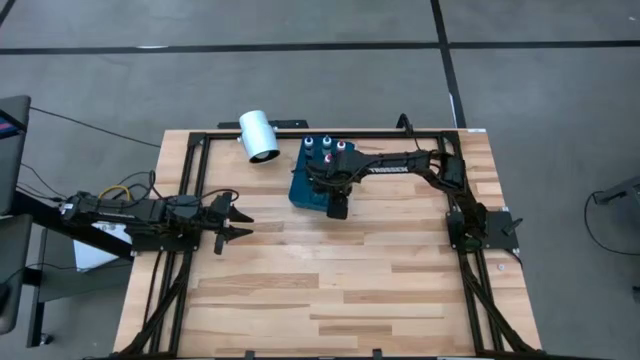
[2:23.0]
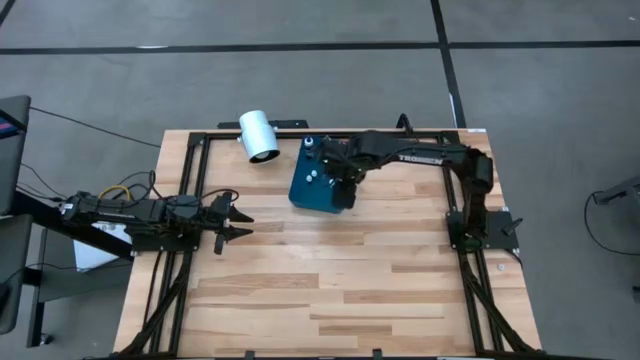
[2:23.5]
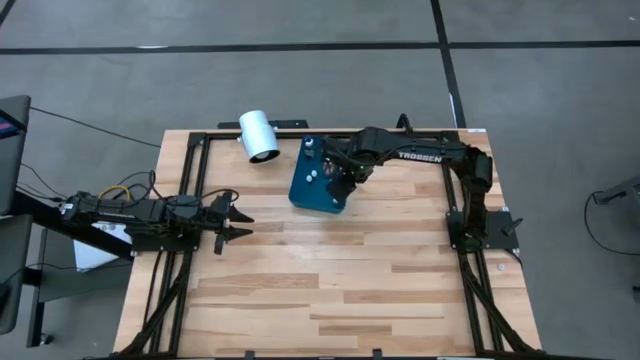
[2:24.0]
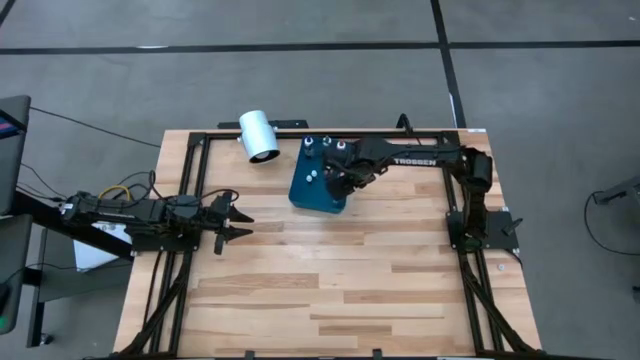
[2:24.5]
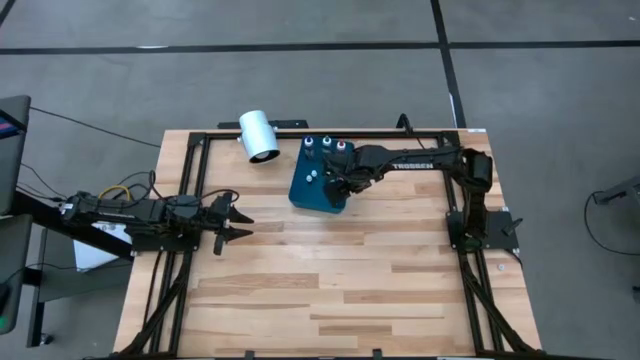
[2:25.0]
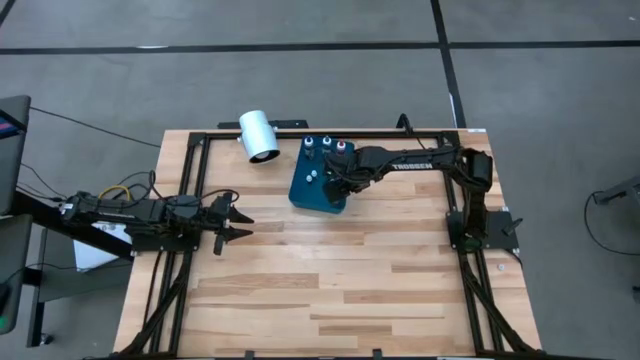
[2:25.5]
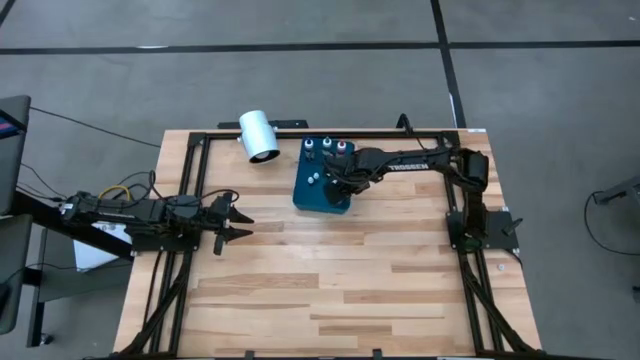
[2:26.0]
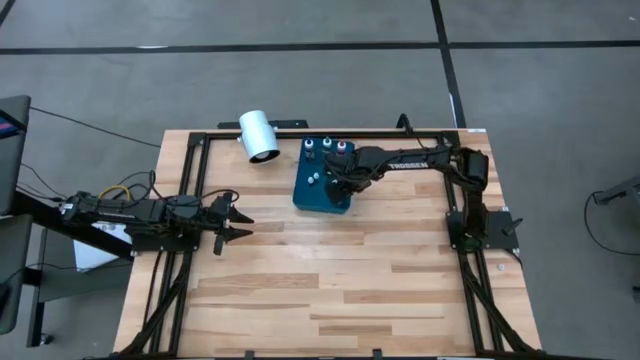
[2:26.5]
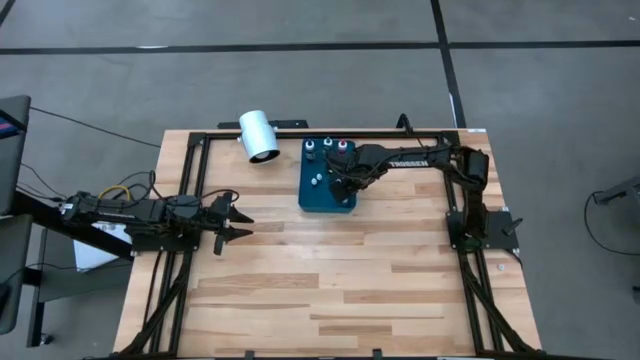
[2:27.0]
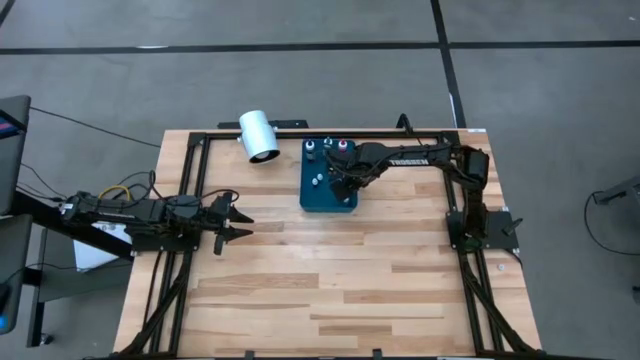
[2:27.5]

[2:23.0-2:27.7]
Task: Pick & Place food coloring
Adjust the blue bin on the table

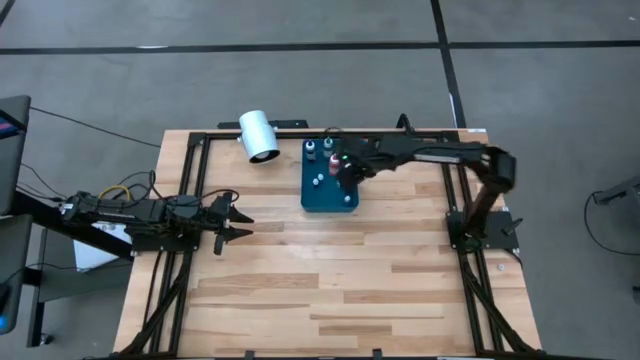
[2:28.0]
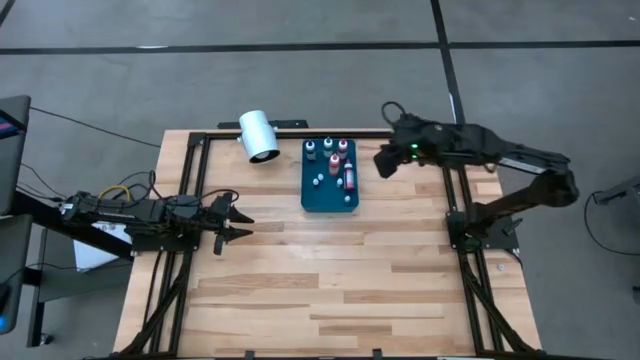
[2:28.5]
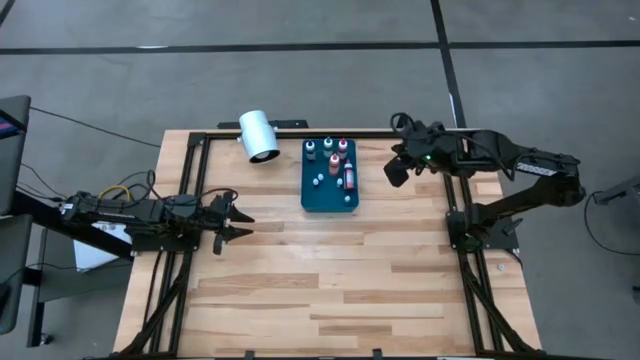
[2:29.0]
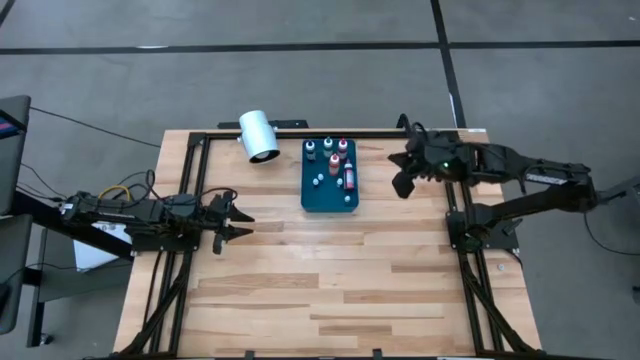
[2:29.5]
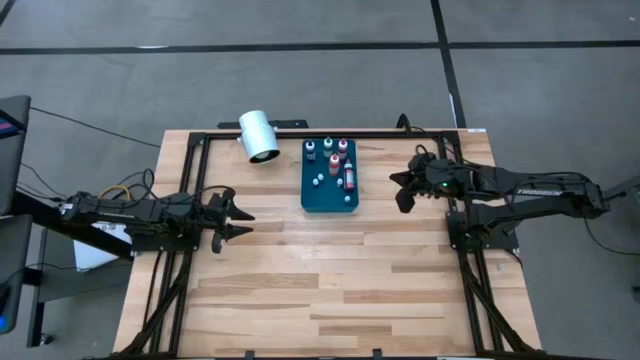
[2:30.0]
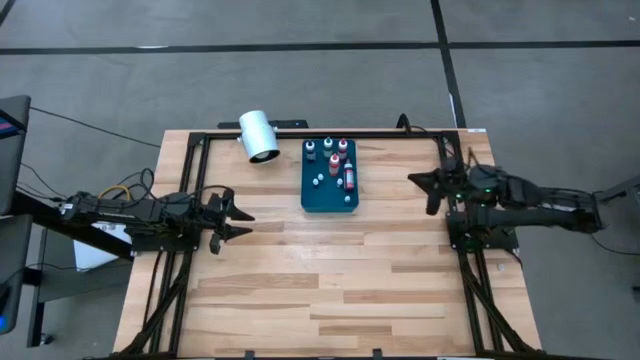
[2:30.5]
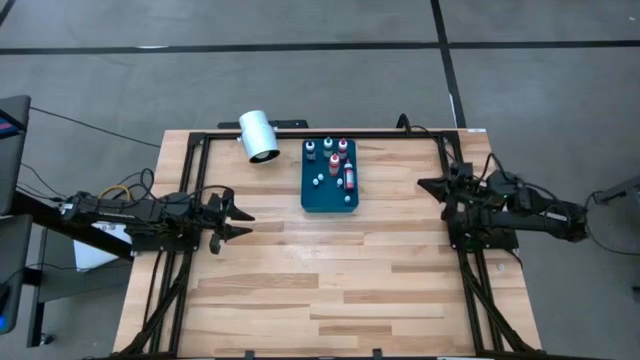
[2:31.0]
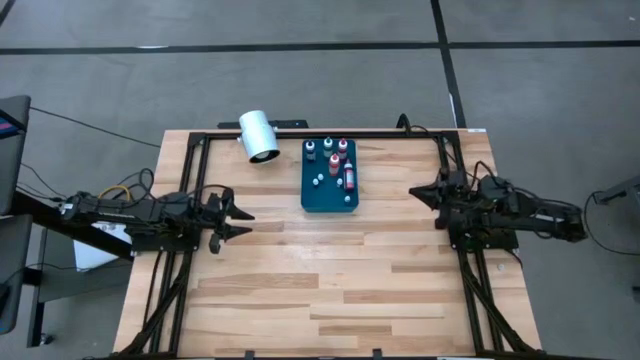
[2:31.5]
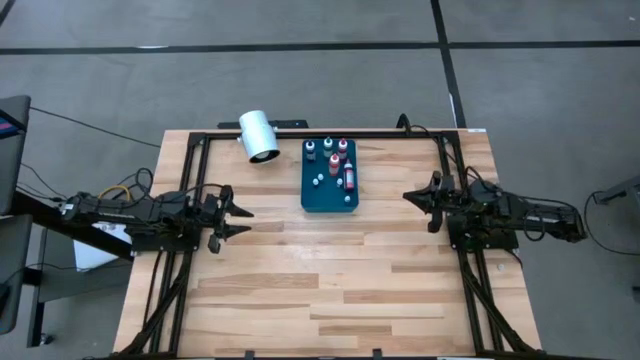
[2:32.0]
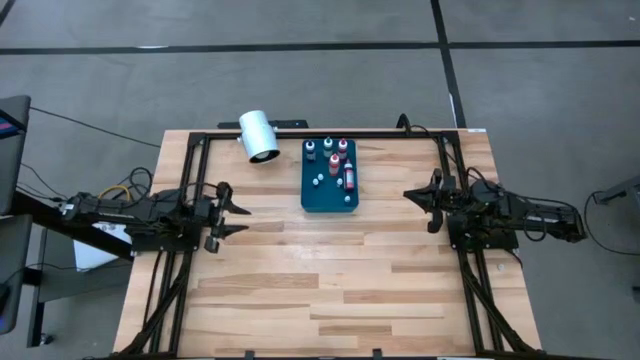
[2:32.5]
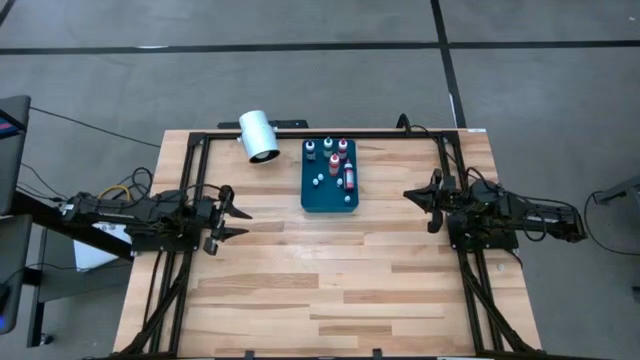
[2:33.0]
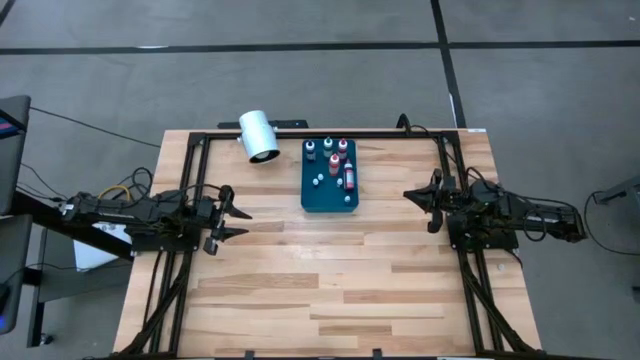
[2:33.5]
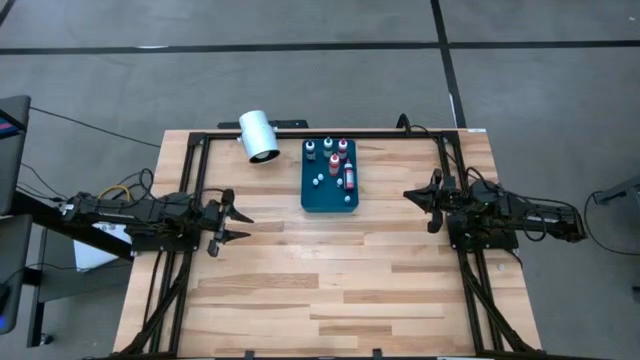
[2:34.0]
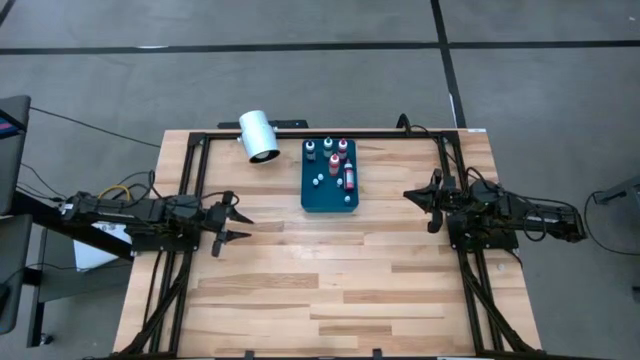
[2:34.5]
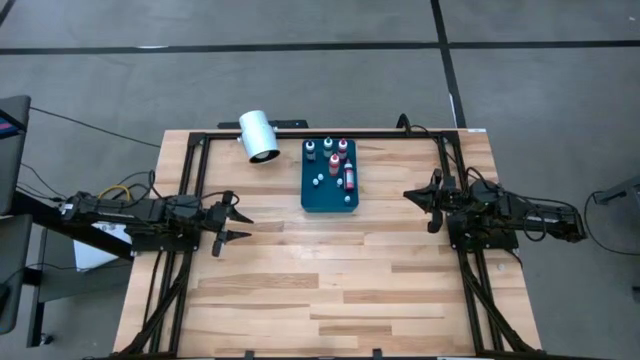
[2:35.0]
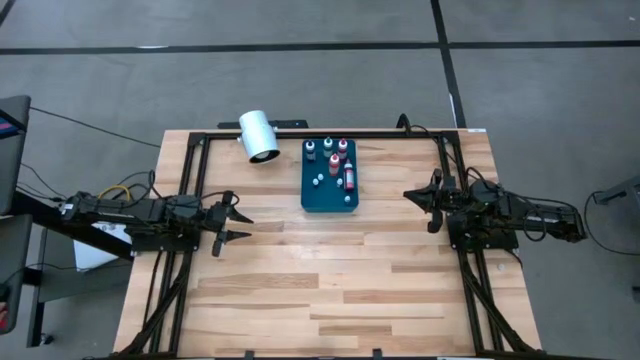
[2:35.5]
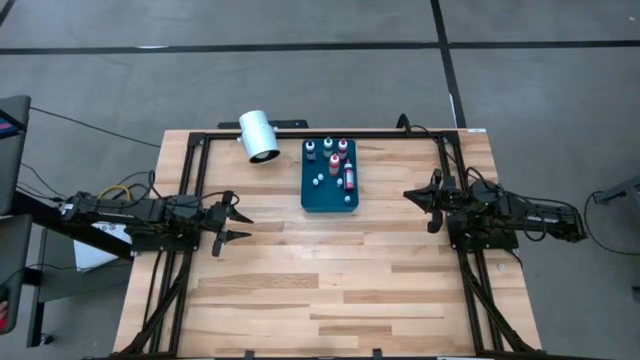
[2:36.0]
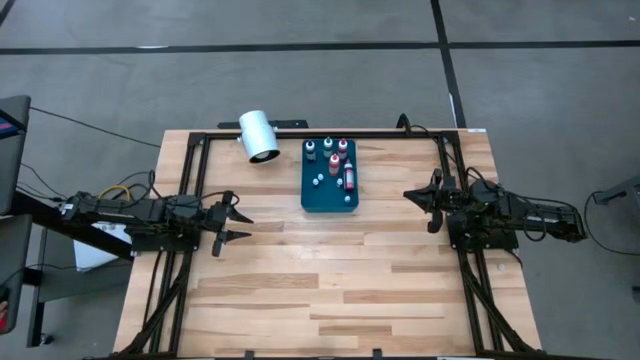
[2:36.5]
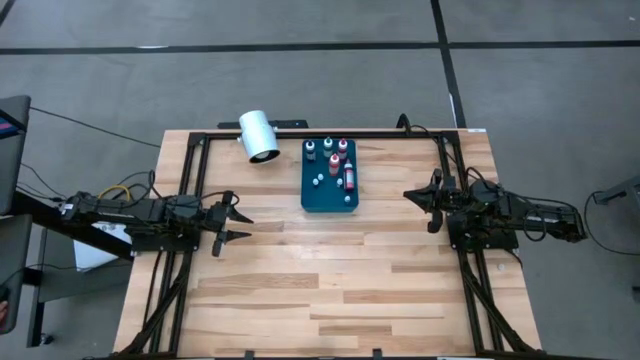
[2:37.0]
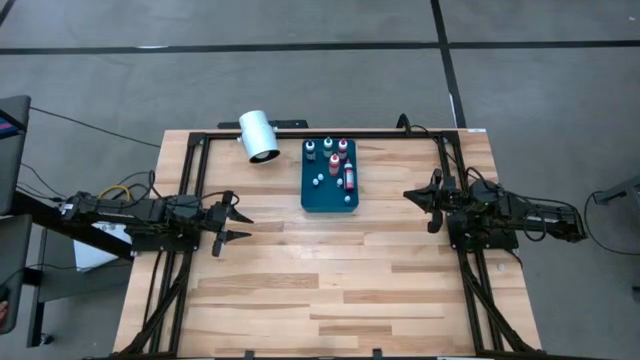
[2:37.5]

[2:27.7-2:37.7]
Return to Home Position

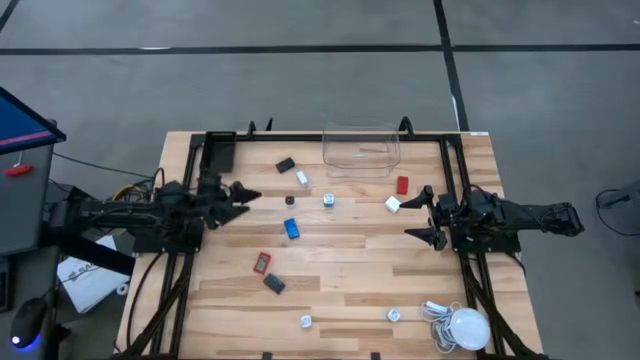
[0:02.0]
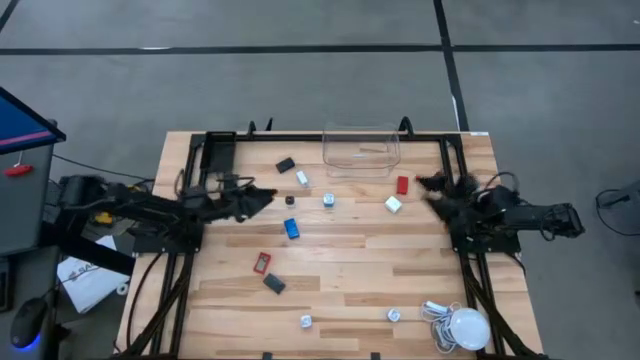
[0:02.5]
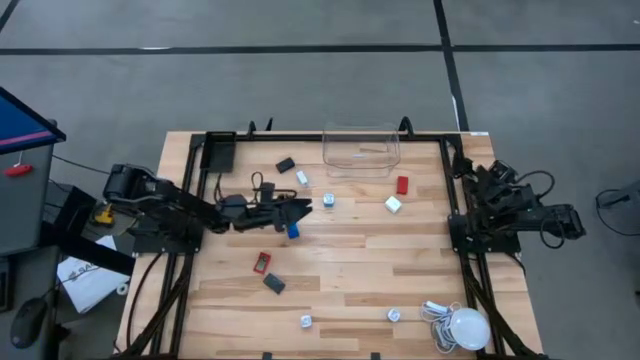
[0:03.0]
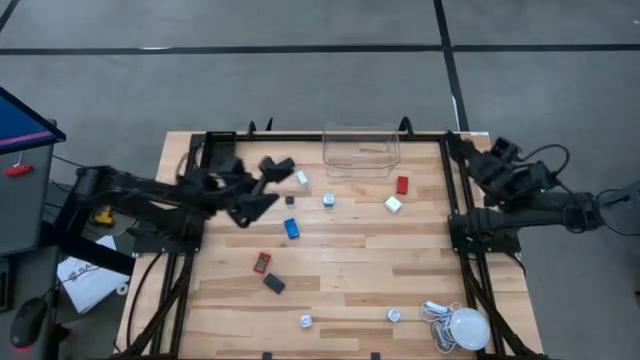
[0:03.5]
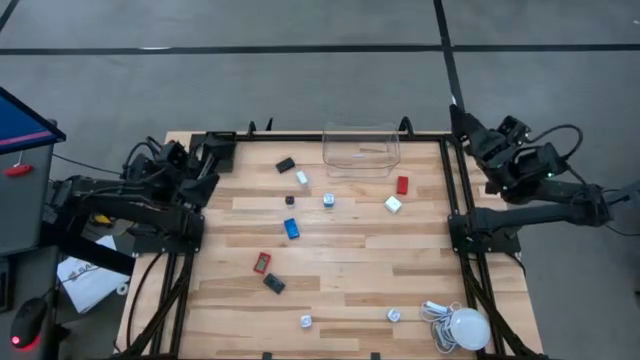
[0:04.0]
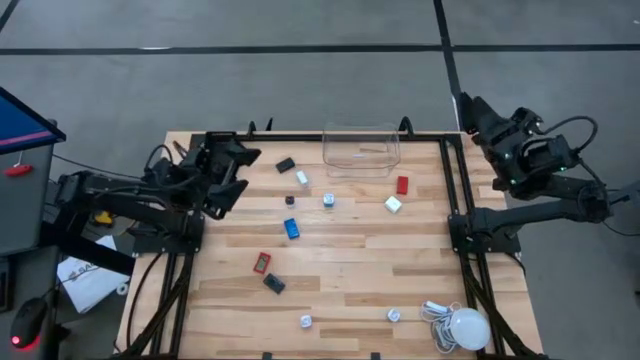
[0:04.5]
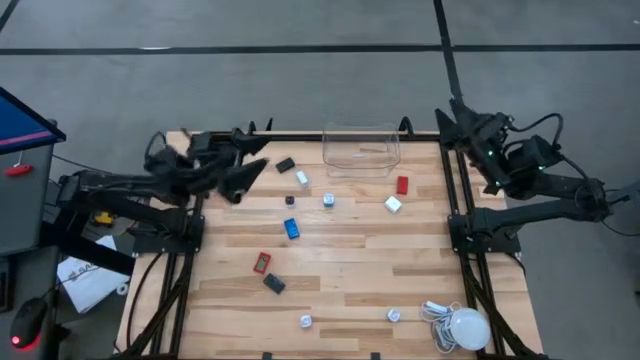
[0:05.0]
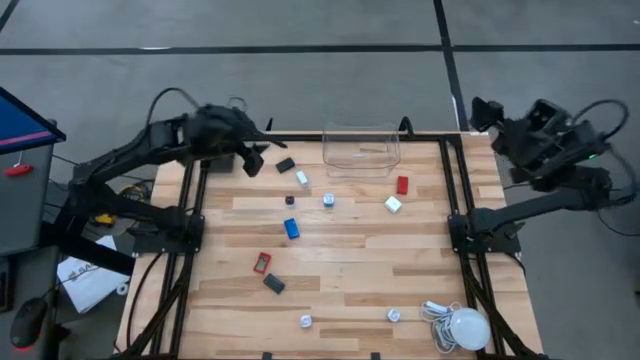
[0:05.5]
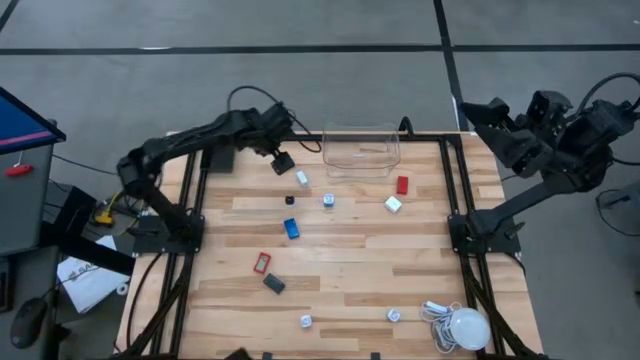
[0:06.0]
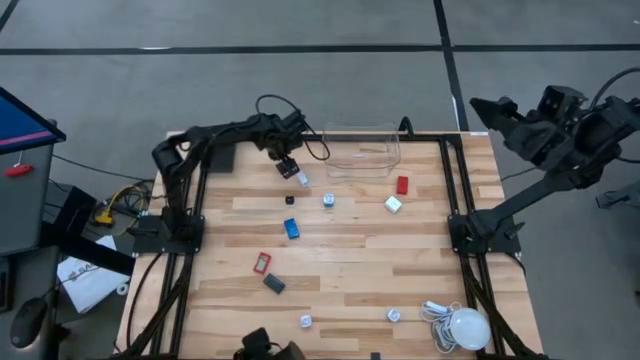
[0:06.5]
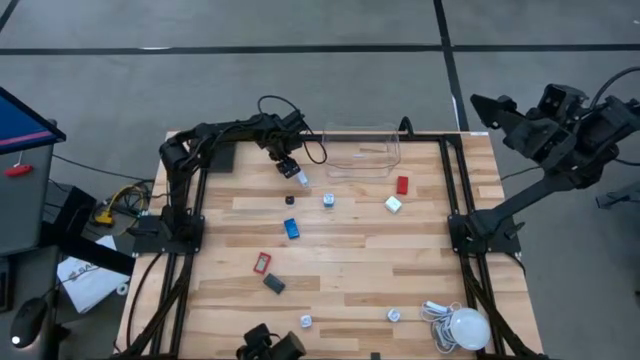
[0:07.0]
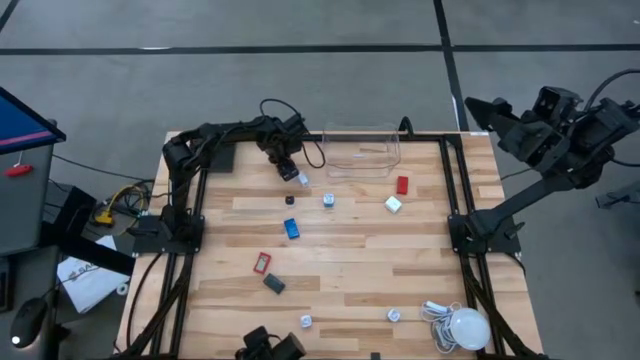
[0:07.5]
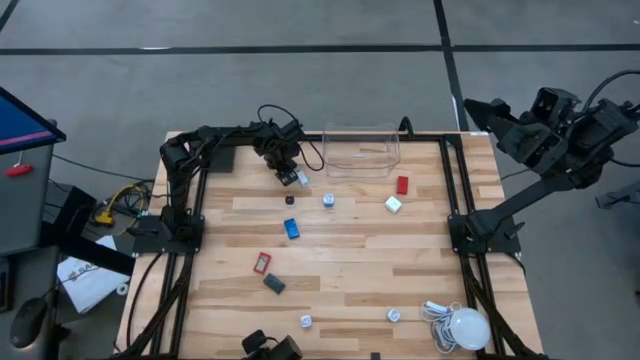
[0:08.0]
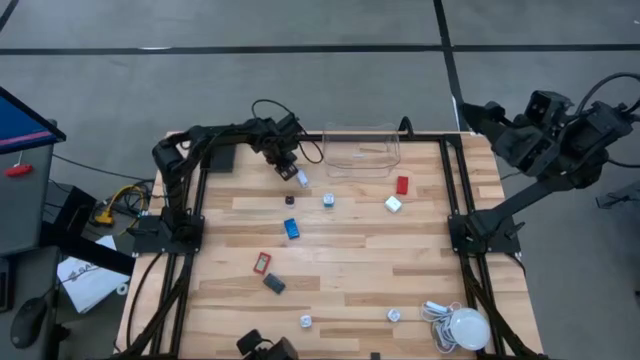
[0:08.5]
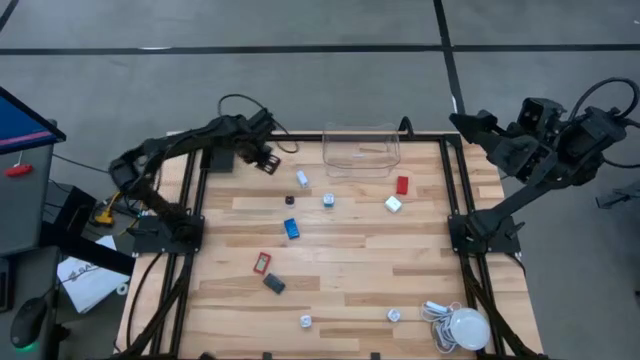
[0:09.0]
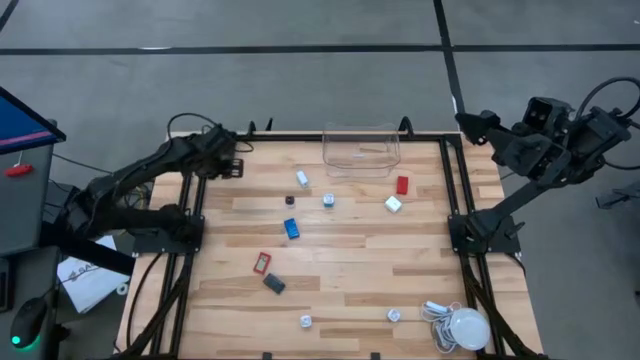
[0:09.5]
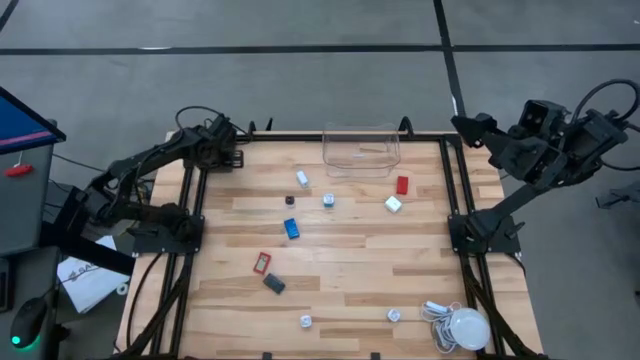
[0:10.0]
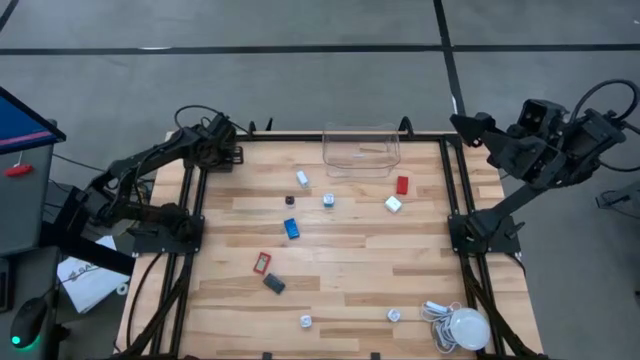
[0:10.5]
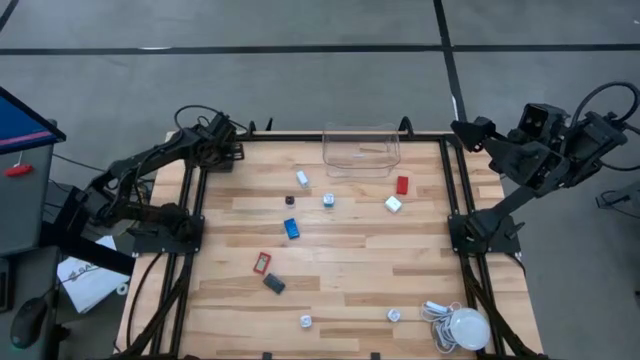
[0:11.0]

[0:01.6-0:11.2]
Task: Pick & Place Office items
Put the top black digital clock into the black basket
